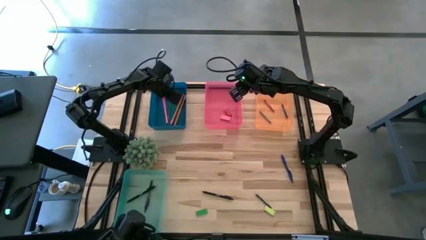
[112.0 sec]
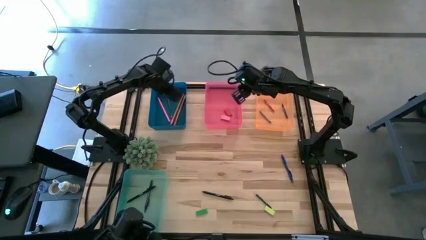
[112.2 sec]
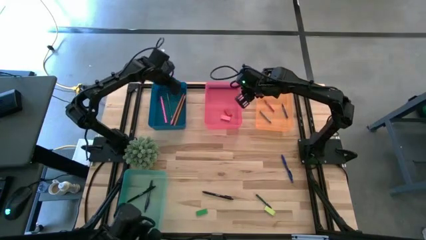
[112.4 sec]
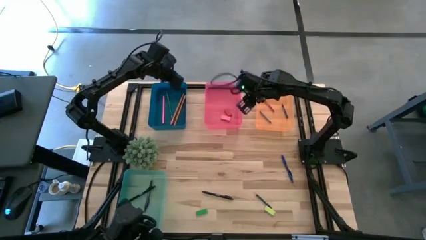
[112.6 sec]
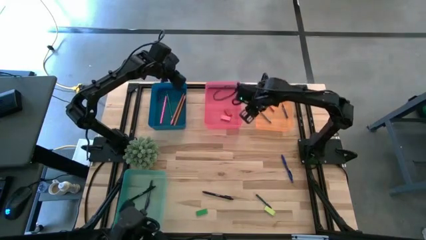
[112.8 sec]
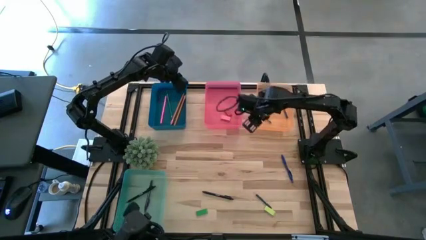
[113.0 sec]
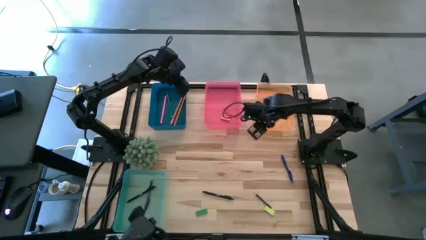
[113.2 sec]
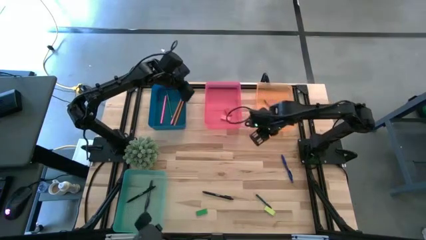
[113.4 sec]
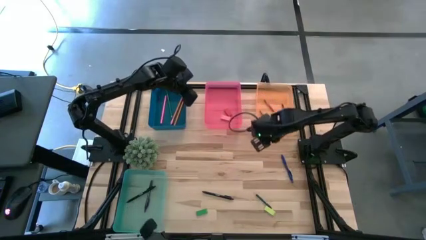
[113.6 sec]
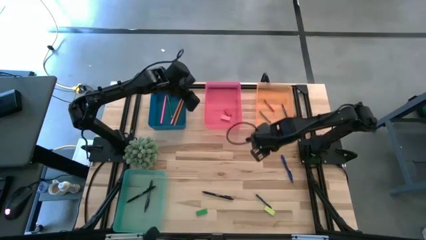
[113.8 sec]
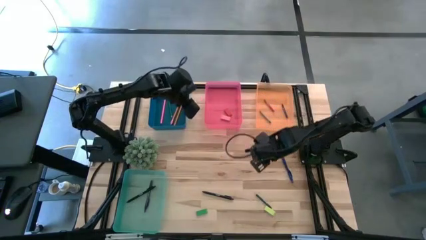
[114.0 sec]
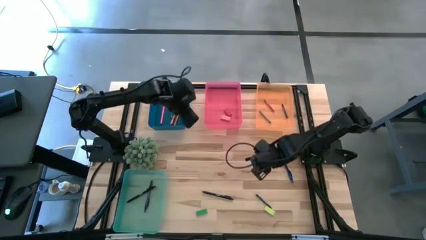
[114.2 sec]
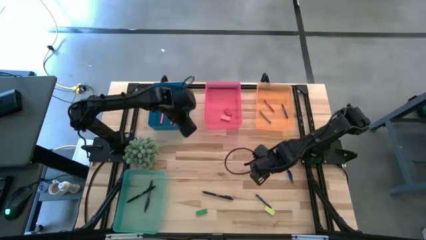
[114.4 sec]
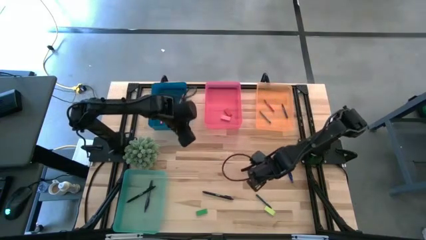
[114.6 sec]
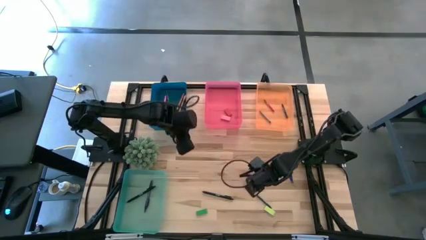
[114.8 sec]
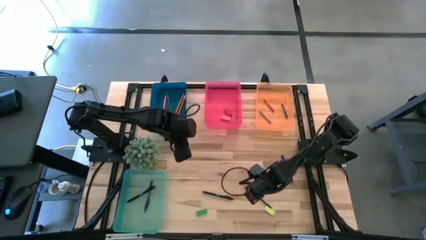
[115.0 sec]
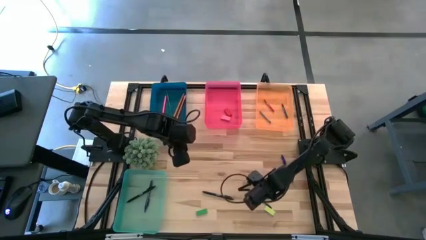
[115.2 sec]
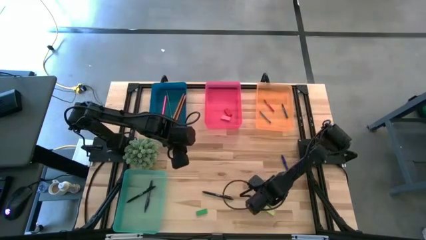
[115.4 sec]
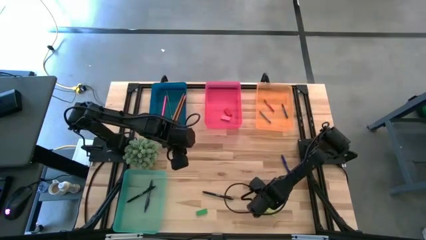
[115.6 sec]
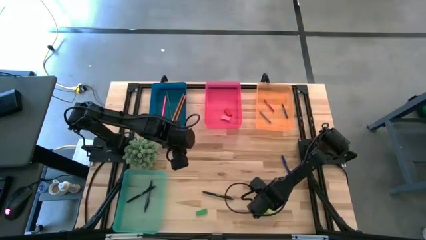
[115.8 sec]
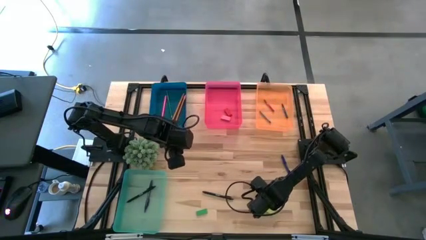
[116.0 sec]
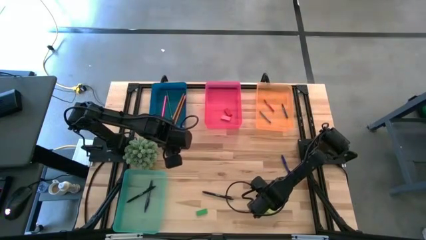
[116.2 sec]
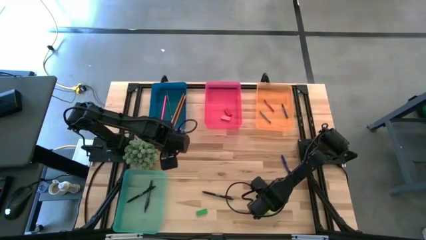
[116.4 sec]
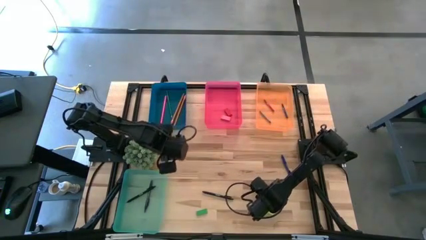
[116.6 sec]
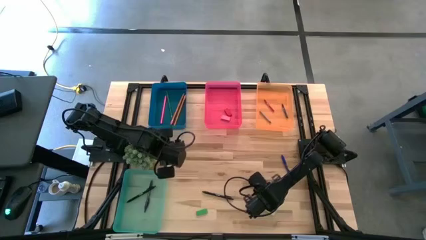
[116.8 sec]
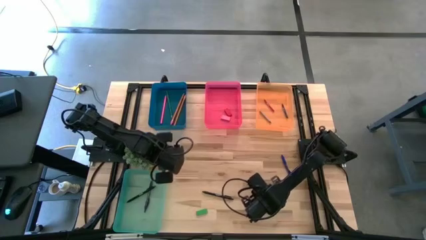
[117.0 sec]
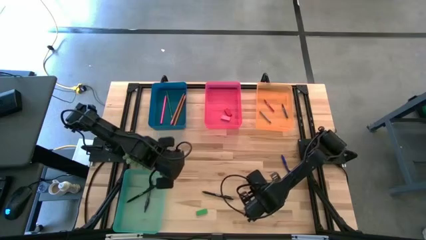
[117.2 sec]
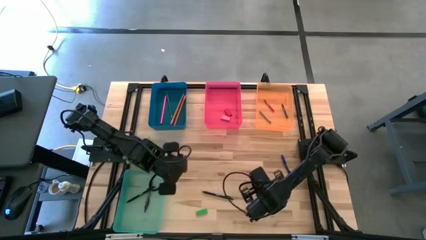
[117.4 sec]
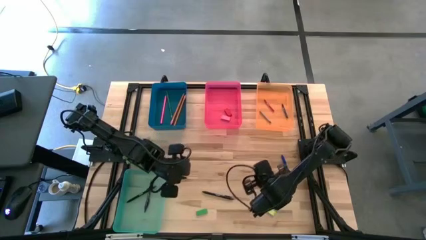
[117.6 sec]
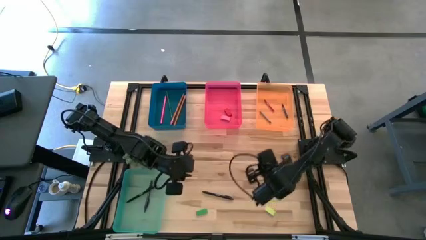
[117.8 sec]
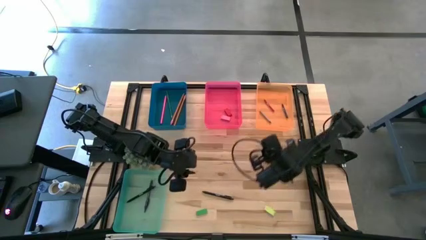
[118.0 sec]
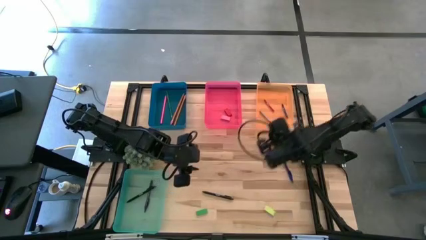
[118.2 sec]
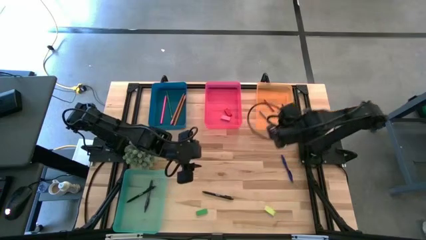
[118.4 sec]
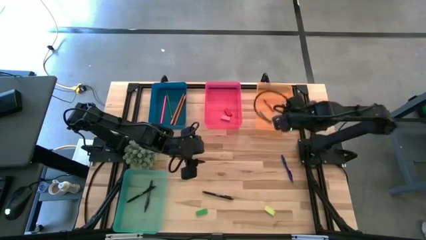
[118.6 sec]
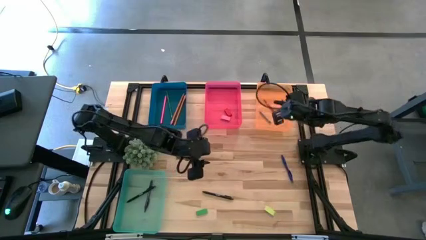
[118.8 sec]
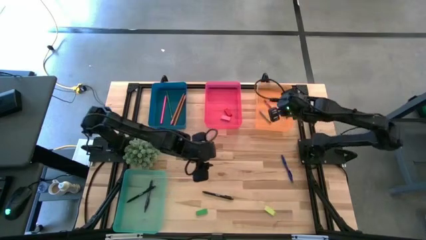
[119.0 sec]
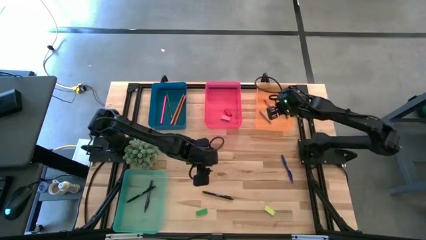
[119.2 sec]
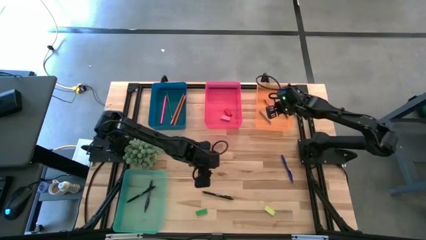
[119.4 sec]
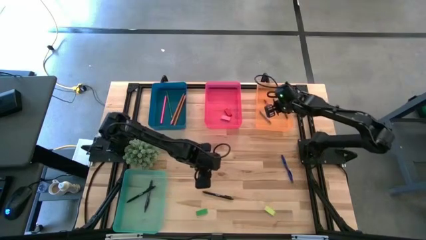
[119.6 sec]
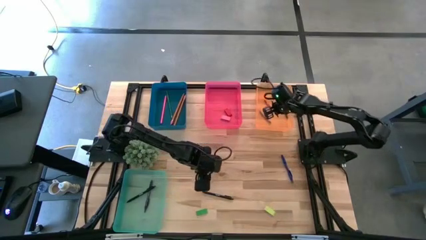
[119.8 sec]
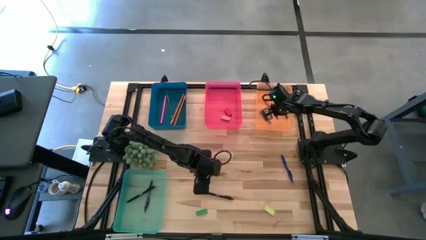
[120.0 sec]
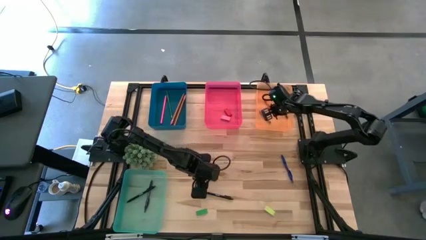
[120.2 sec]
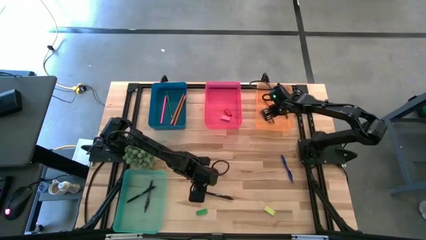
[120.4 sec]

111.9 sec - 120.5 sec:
Task: Sort crayons/erasers/pens/pencils in bins
Put the green crayon into the orange bin

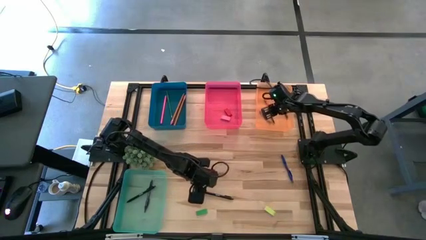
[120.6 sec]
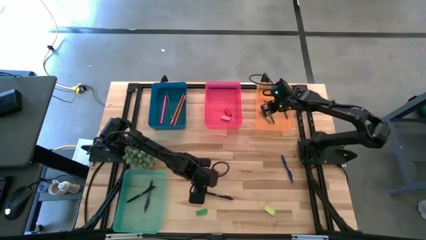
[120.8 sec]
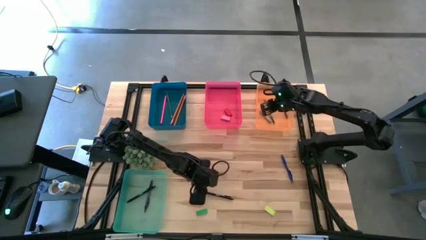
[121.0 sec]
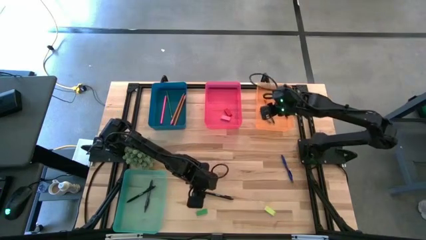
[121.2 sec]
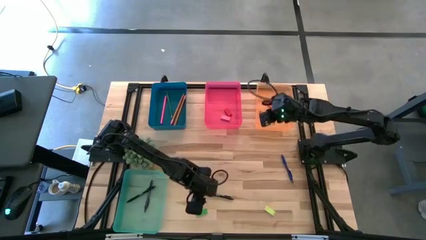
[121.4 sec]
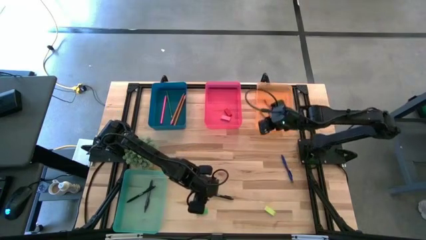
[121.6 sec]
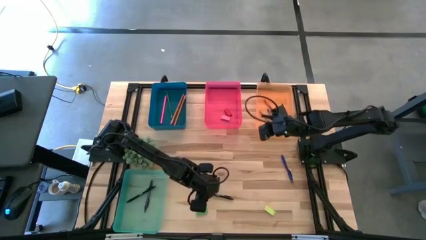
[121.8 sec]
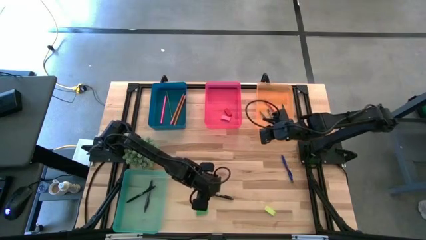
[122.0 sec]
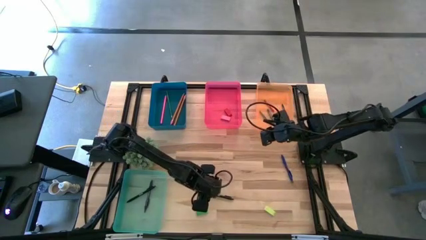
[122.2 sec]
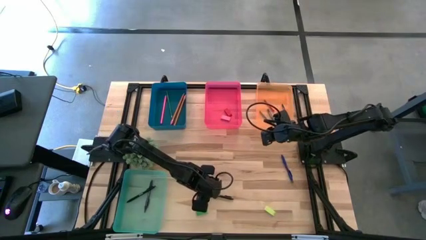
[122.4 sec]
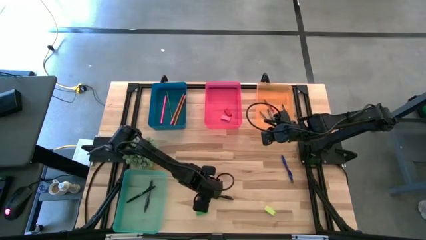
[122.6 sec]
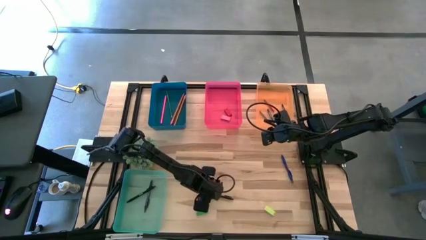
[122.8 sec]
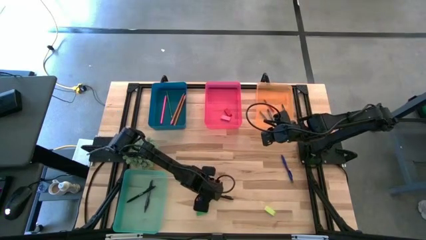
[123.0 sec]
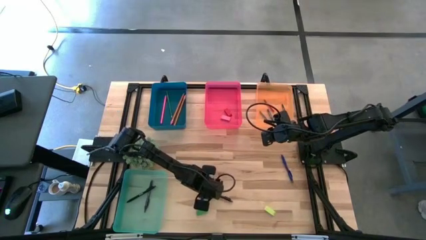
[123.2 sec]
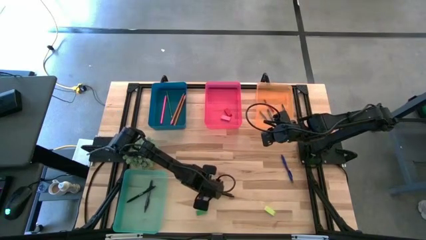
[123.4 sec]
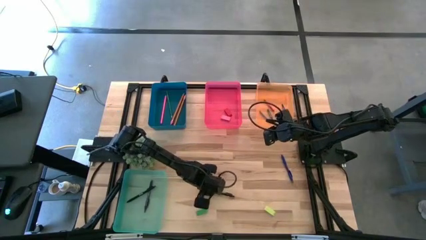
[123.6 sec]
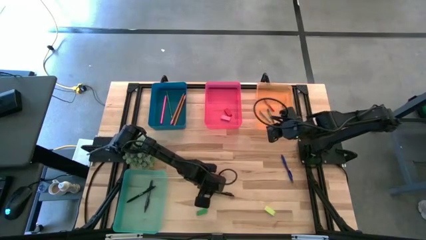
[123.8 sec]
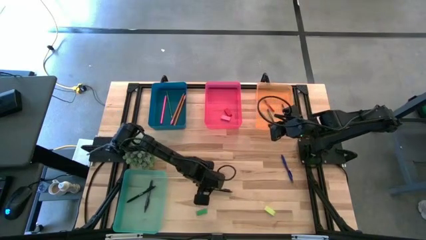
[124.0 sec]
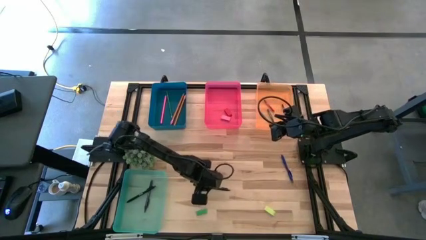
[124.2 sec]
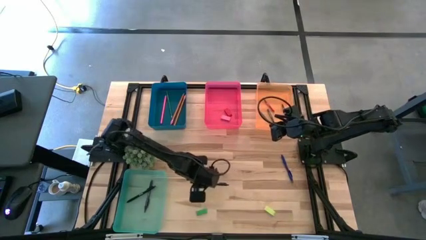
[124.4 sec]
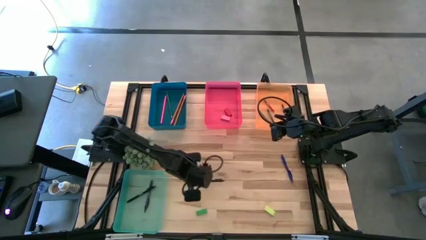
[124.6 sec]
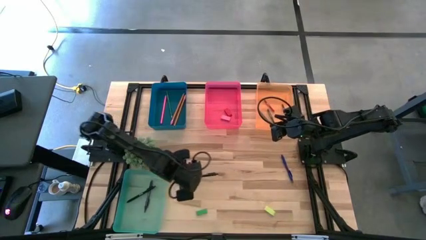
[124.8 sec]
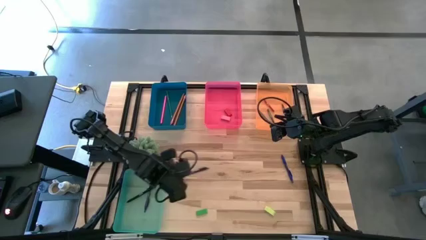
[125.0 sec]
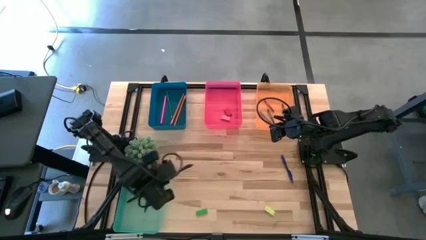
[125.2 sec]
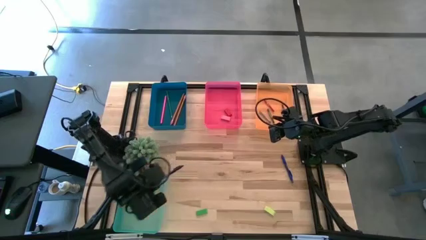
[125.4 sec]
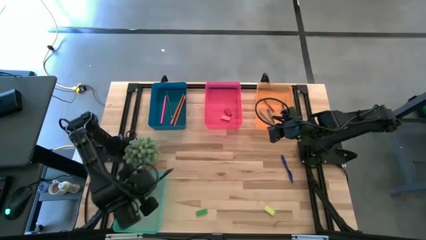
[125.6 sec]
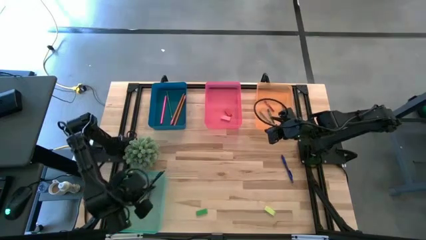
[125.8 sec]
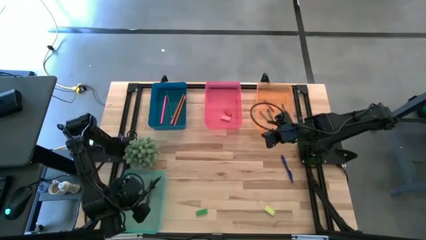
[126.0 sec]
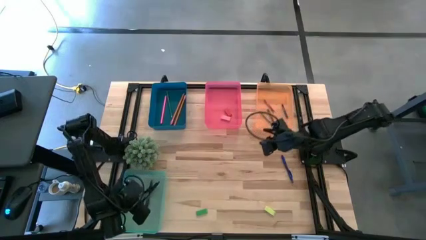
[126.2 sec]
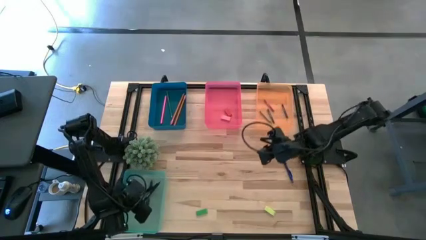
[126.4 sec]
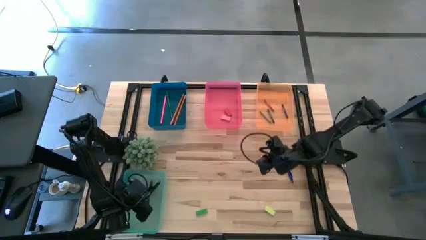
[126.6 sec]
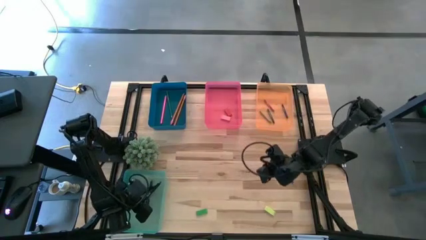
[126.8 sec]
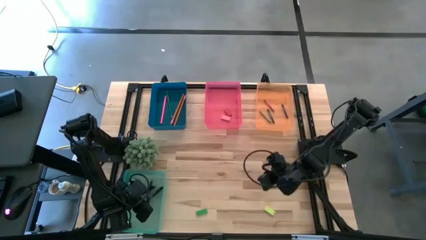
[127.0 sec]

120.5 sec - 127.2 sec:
Put the black pen into the green bin
